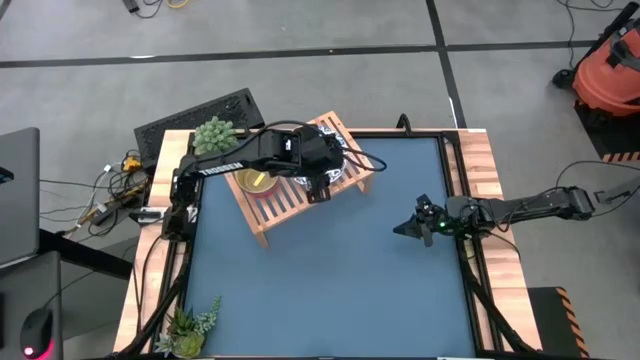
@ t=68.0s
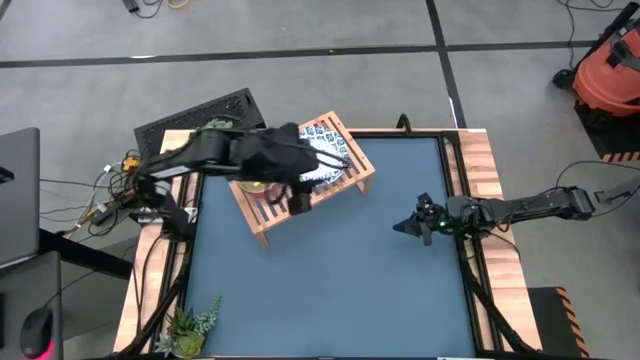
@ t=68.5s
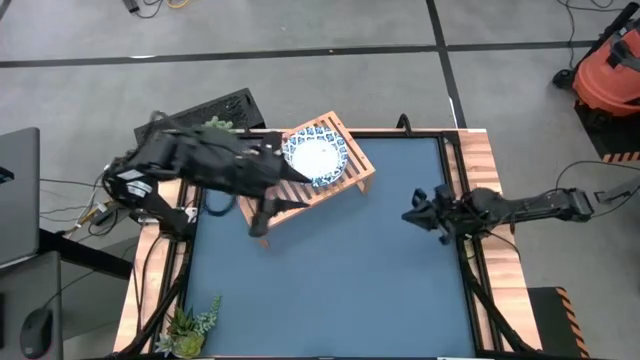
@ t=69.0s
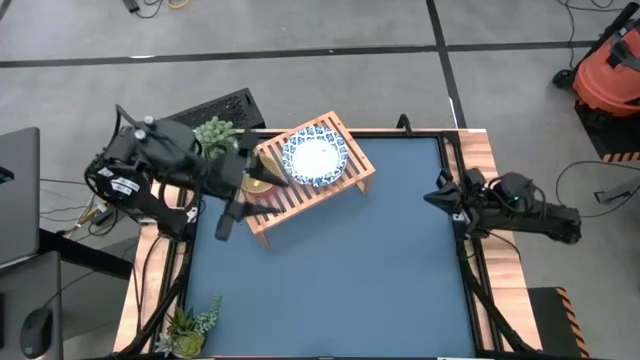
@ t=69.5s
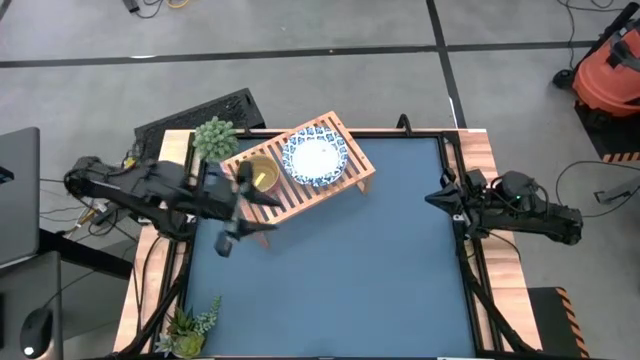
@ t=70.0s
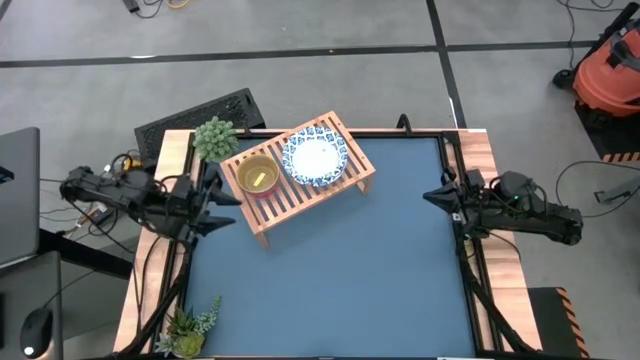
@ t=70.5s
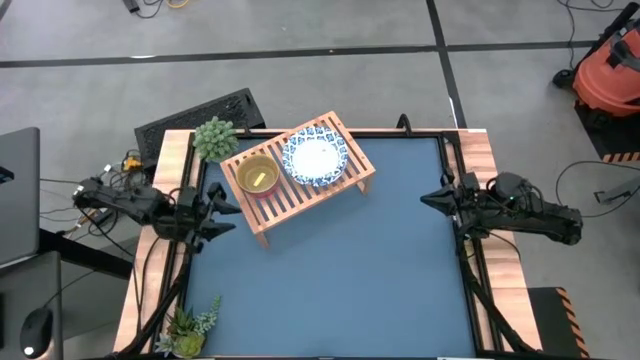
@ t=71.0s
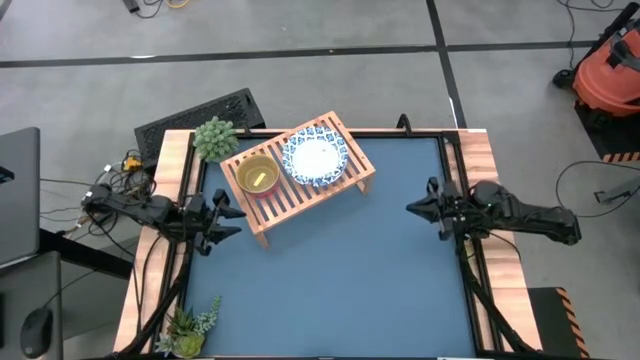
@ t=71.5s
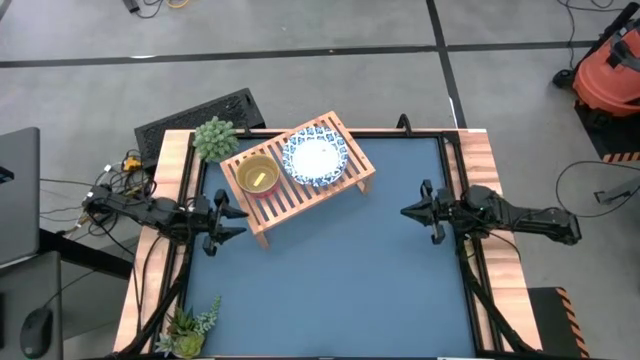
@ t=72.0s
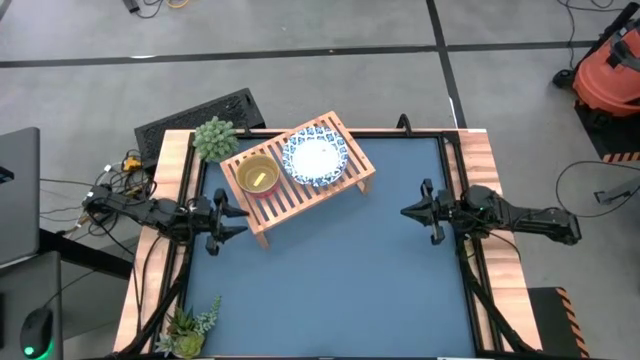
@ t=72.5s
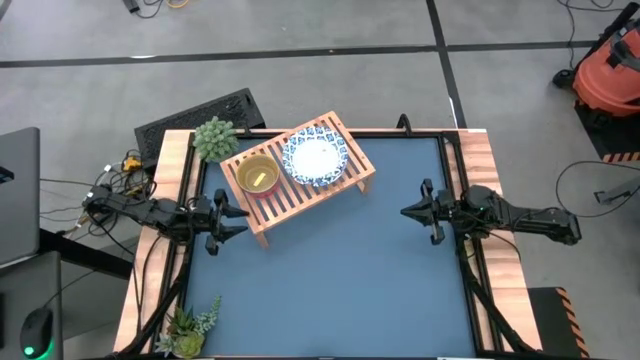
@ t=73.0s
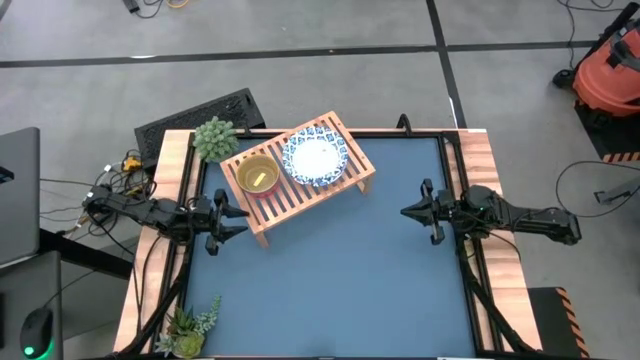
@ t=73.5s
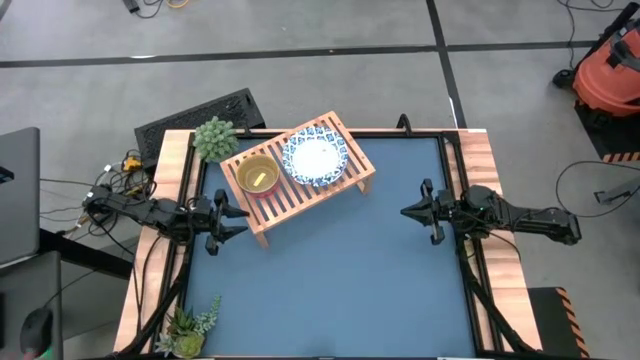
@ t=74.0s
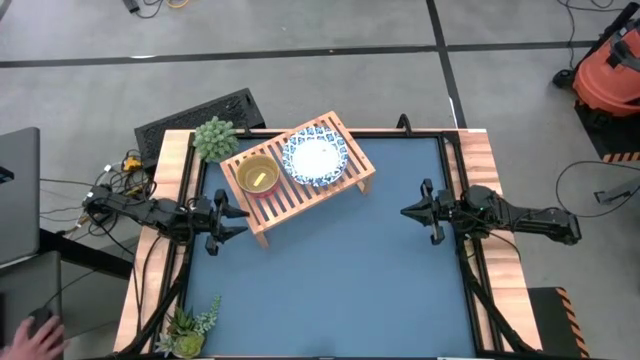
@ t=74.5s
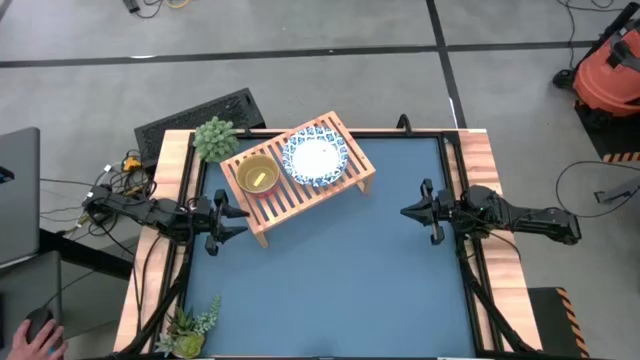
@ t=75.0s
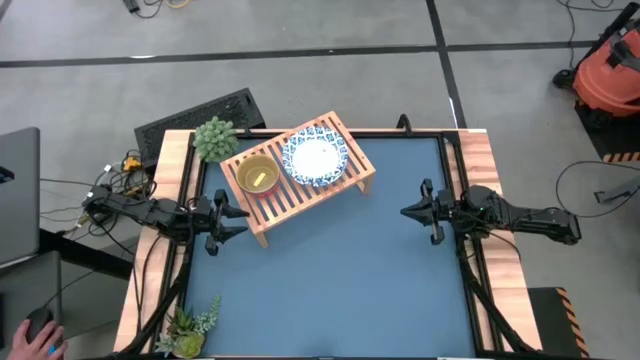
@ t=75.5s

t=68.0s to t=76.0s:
Task: Place and stack bowls onto a shelf
Return to Home Position

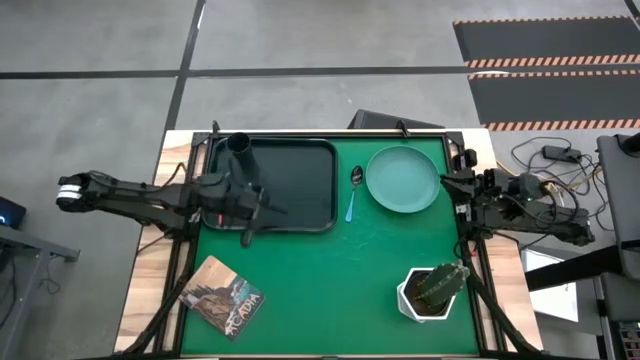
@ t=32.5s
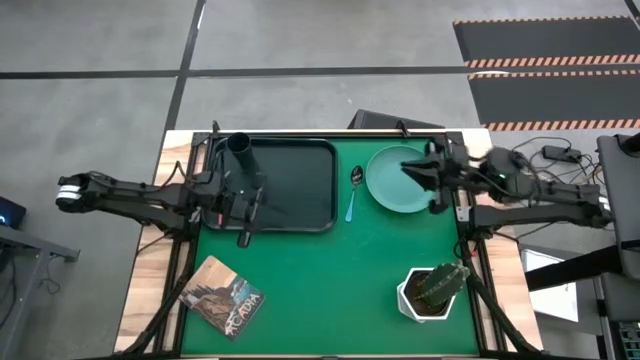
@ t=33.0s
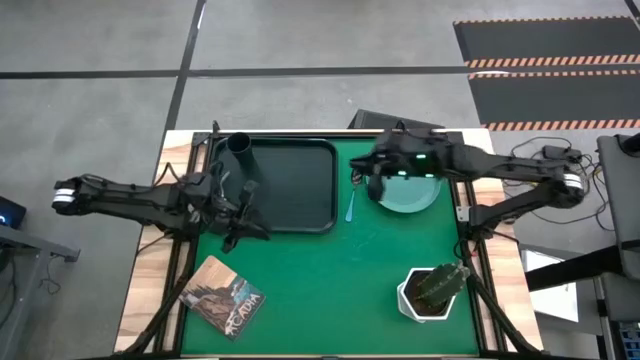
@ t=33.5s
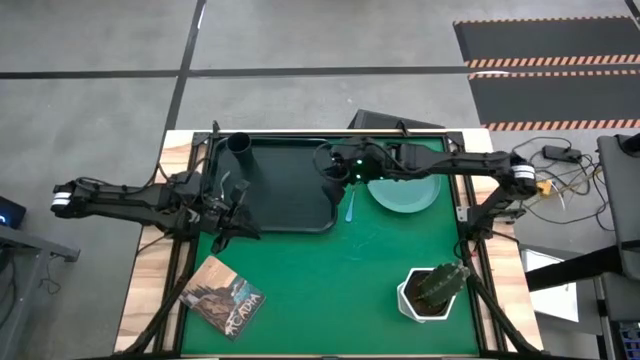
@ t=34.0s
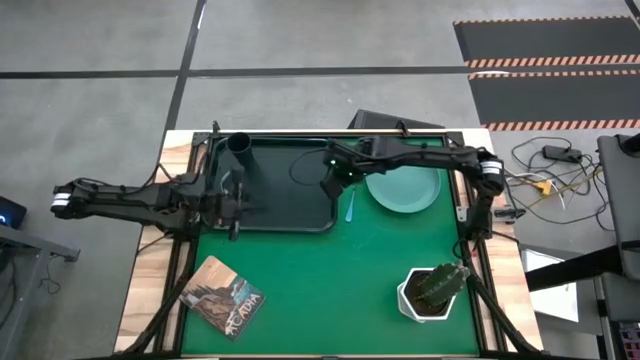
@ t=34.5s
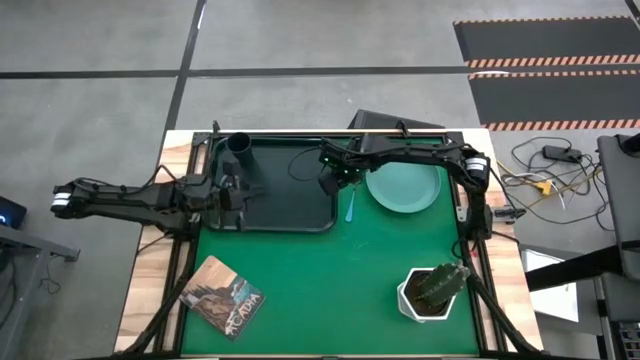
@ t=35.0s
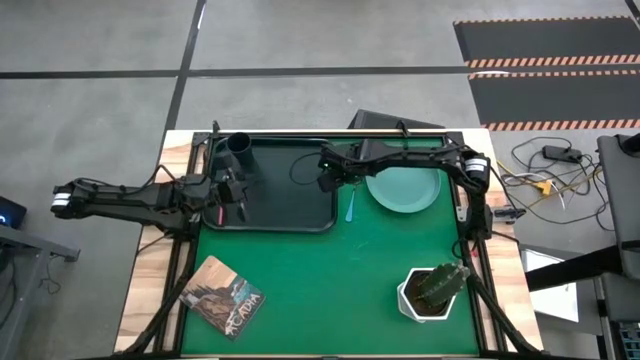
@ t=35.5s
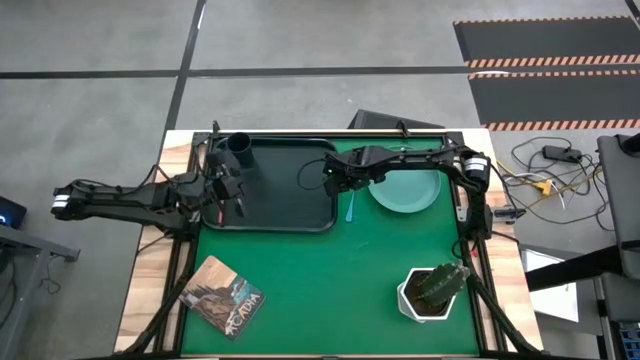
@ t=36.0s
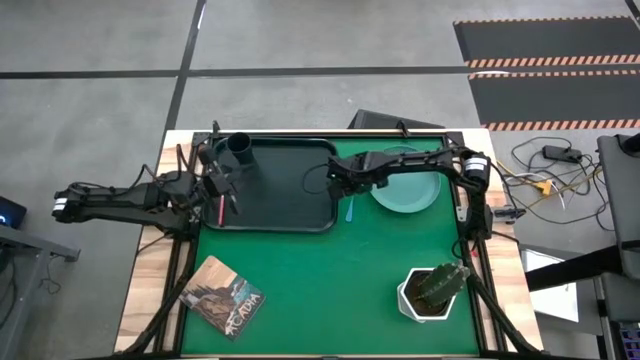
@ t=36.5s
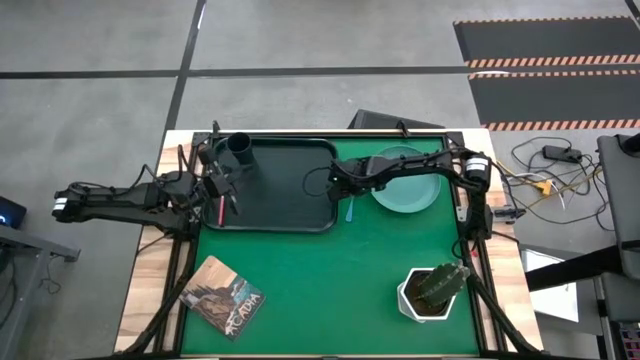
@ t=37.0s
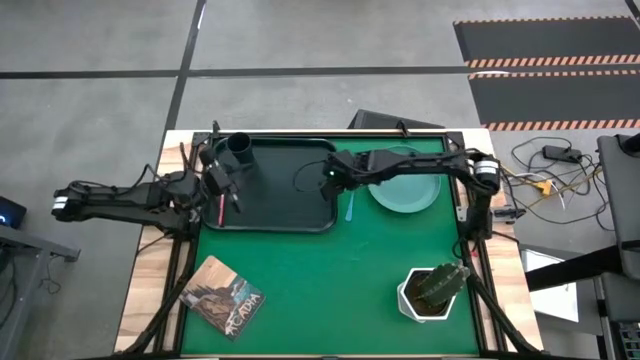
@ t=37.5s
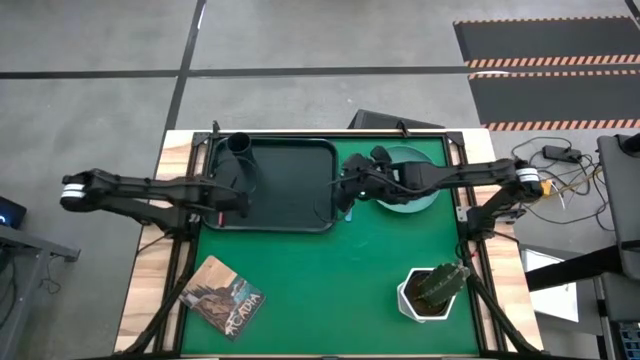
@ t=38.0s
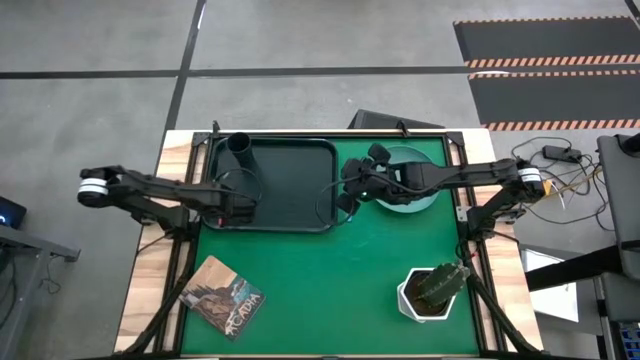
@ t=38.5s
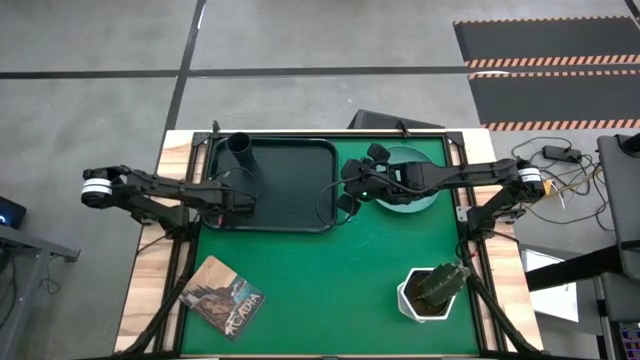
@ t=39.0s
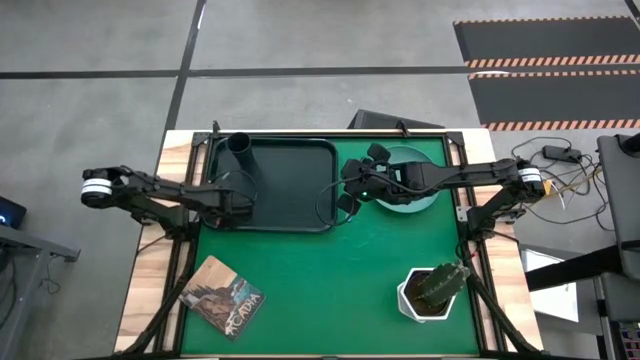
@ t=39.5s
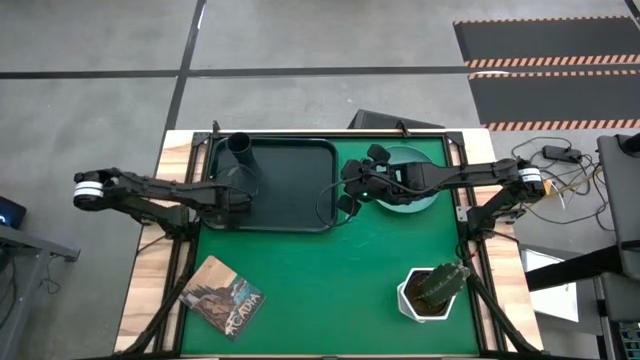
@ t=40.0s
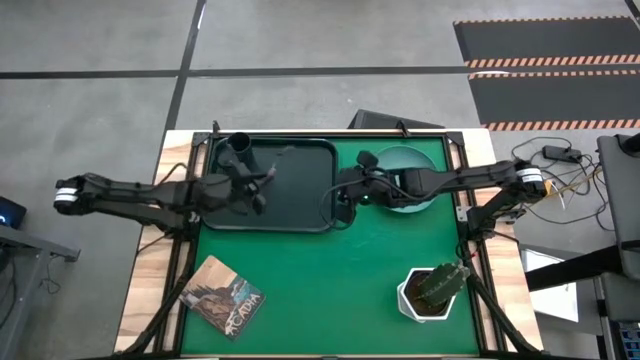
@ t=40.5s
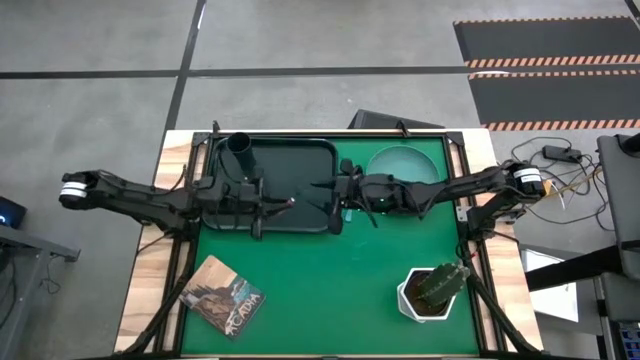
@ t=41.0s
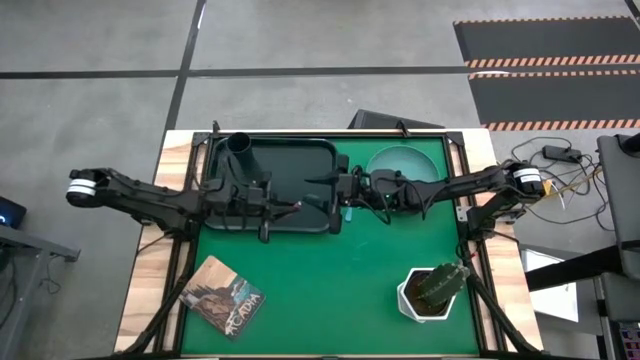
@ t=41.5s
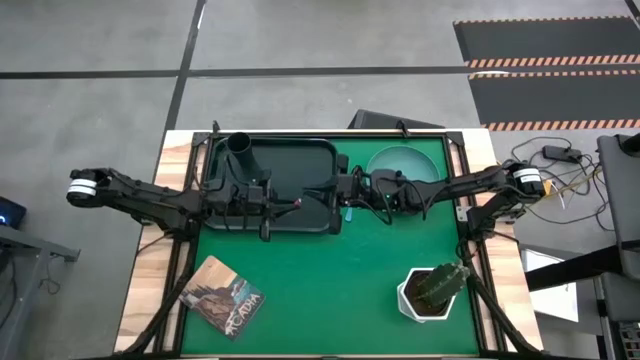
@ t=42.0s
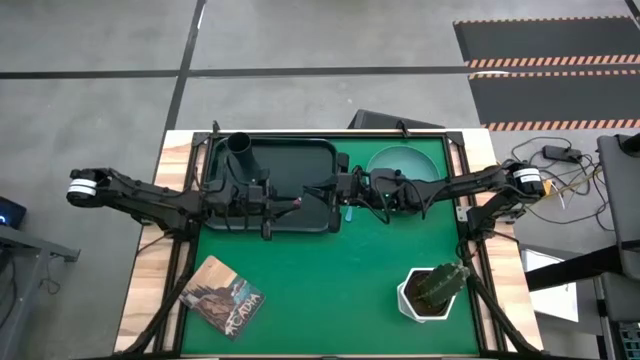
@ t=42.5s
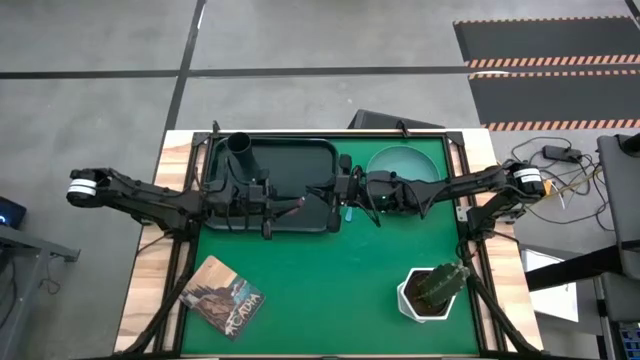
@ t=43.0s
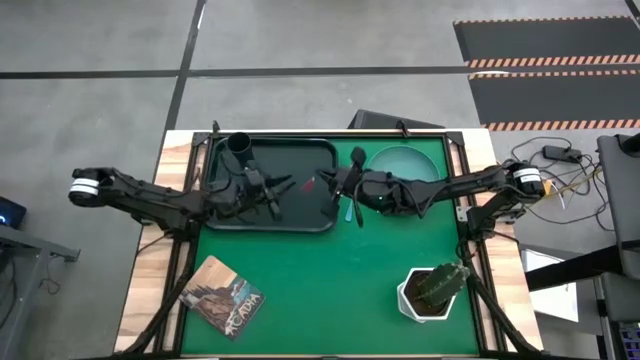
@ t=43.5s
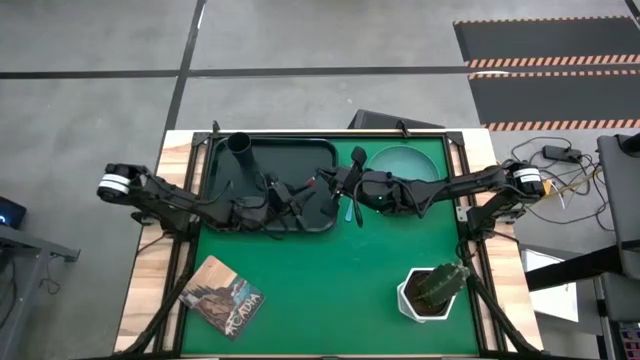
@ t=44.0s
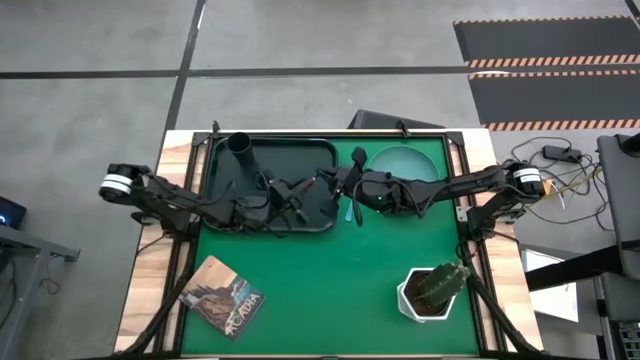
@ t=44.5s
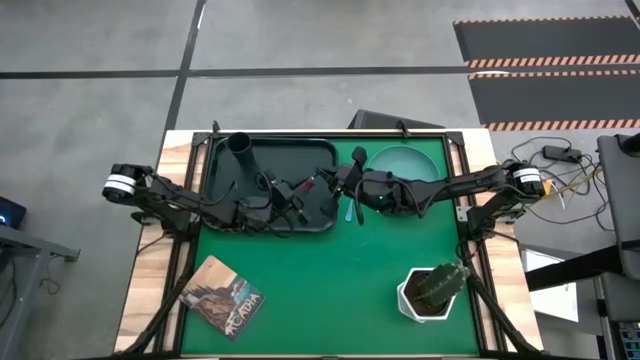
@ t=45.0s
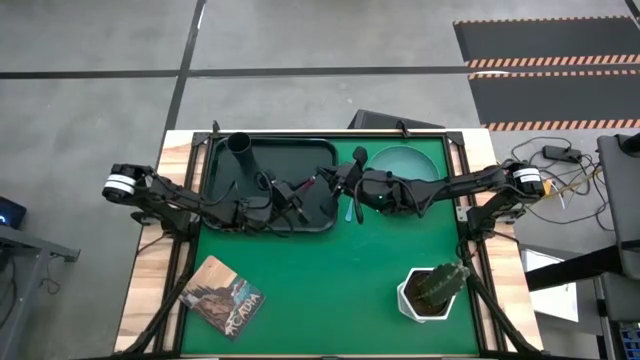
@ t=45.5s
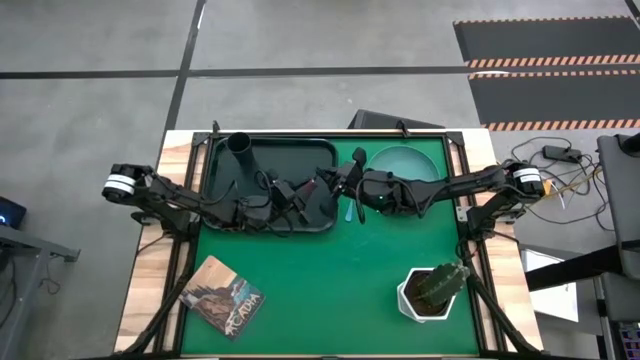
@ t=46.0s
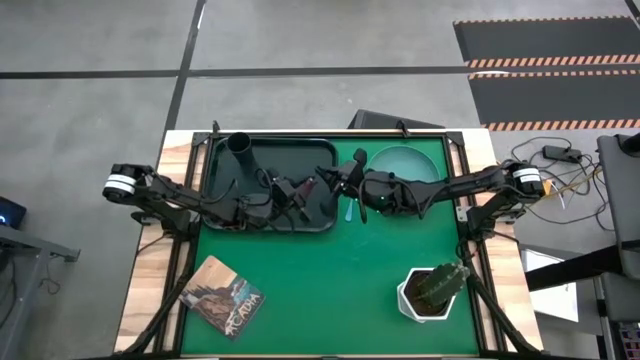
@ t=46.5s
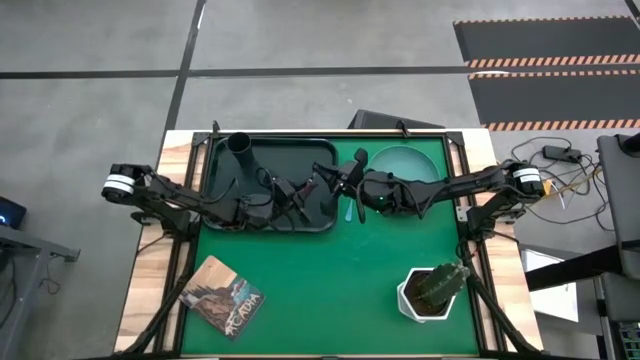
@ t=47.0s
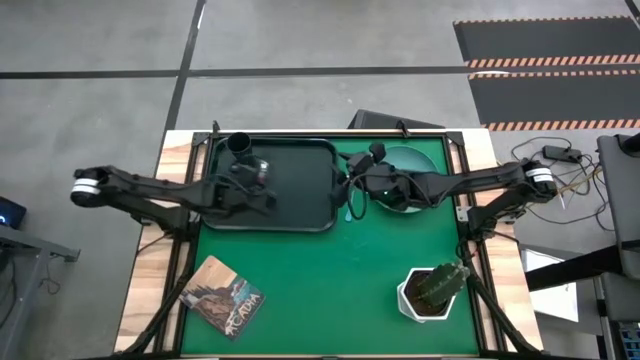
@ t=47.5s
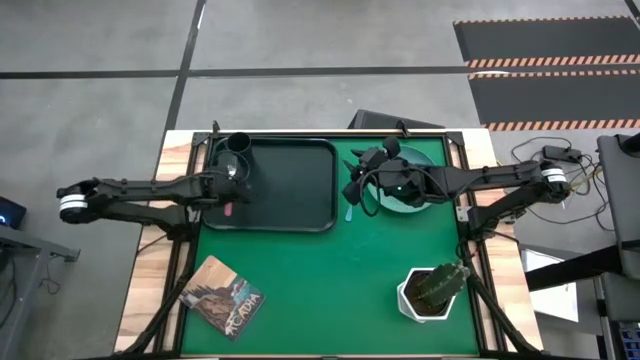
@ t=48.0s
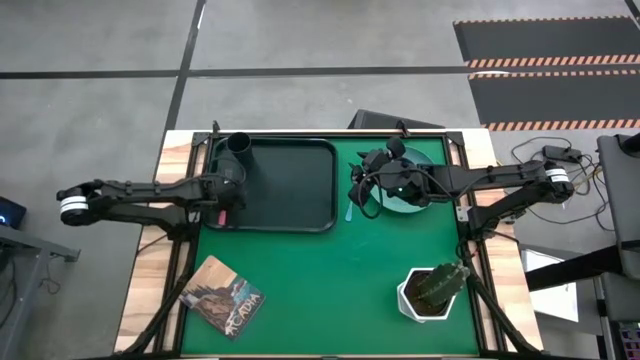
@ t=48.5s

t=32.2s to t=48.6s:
Task: Pick and place plate/cup/fork/spoon on tray
Put the pink fork on the black serving tray to the bottom of the black cup
